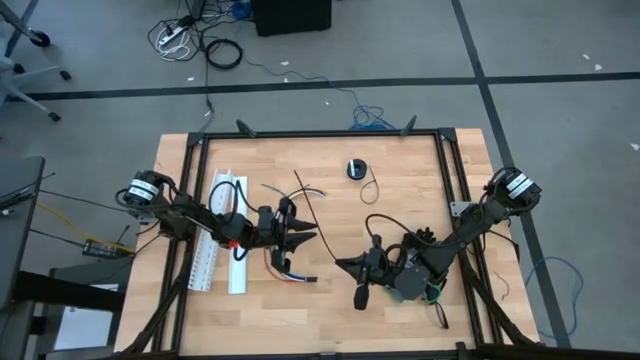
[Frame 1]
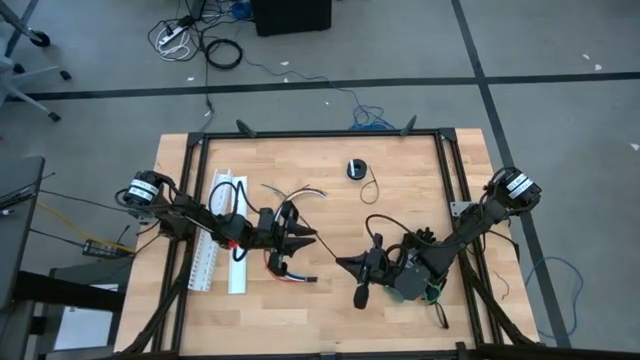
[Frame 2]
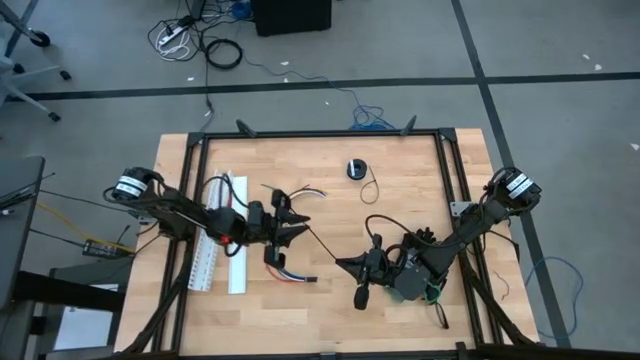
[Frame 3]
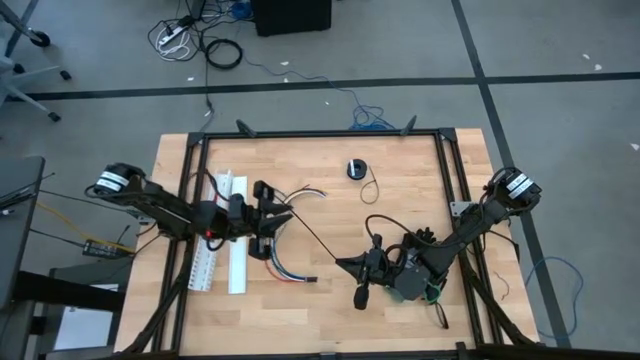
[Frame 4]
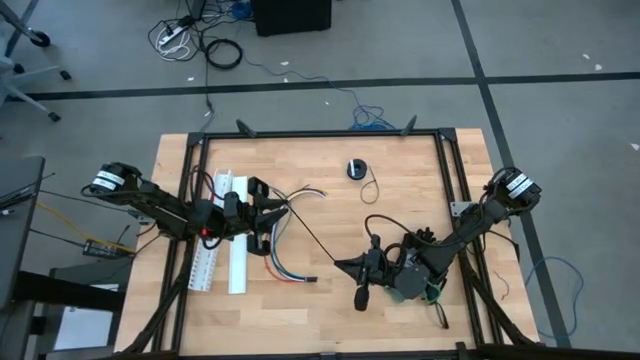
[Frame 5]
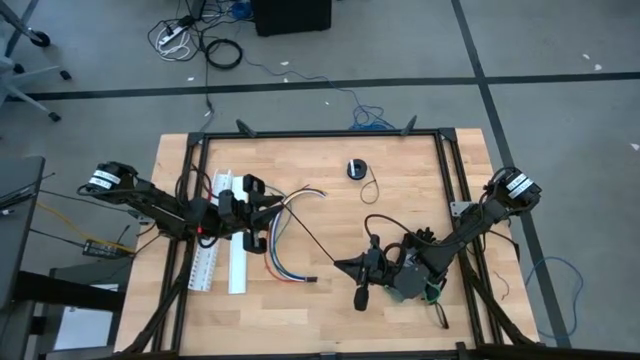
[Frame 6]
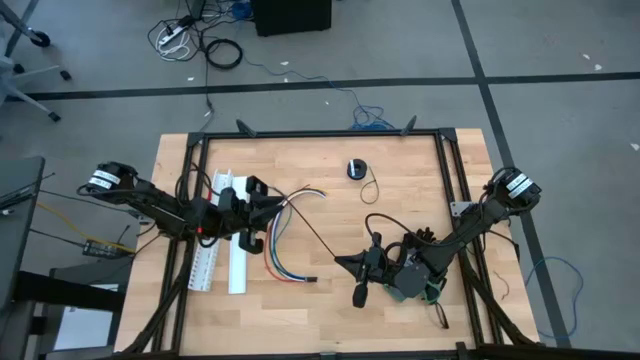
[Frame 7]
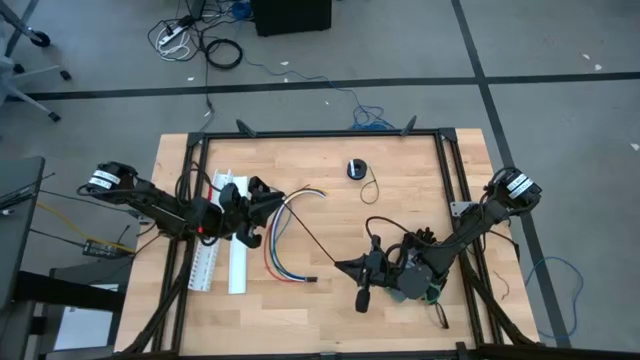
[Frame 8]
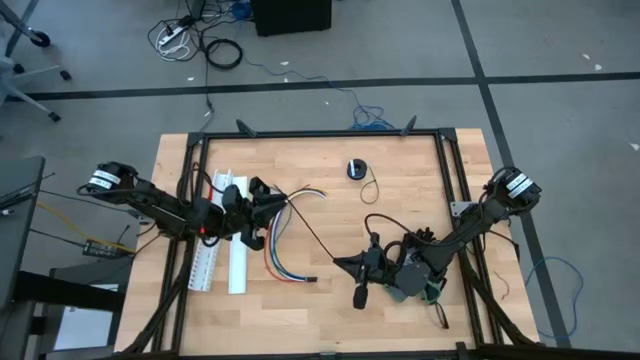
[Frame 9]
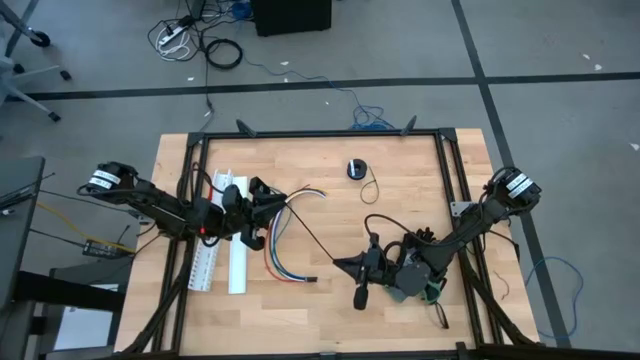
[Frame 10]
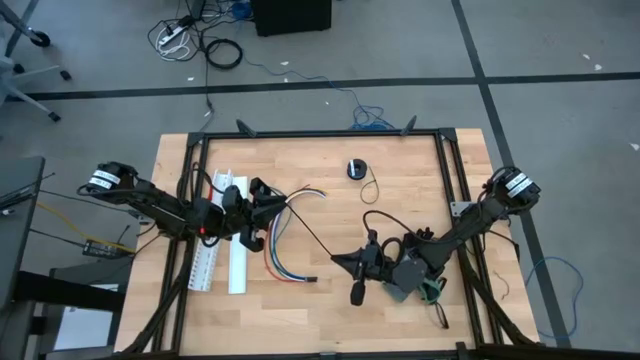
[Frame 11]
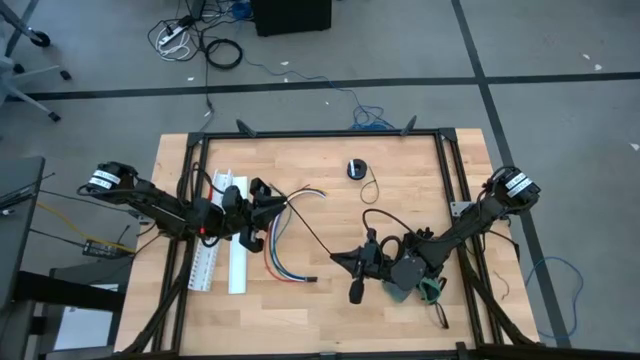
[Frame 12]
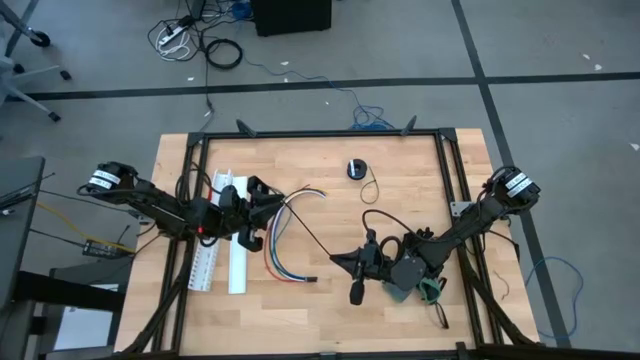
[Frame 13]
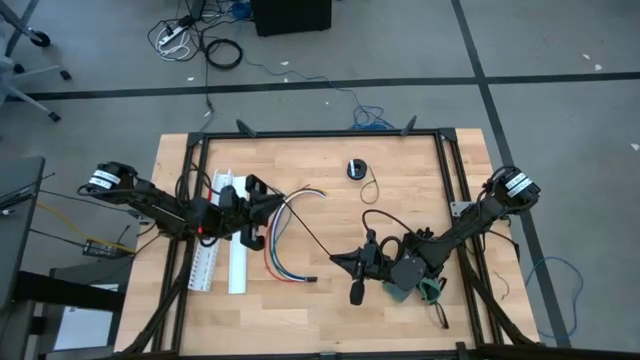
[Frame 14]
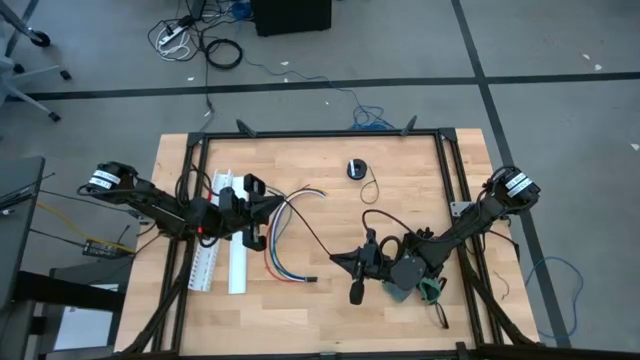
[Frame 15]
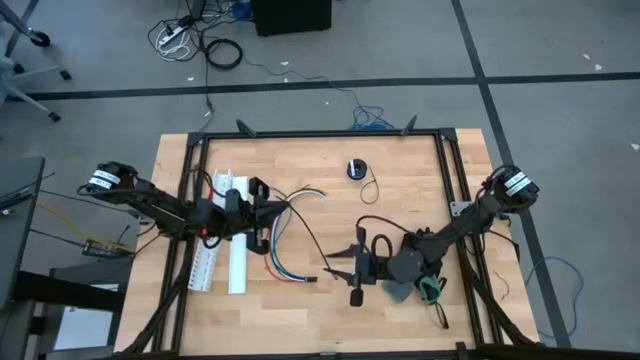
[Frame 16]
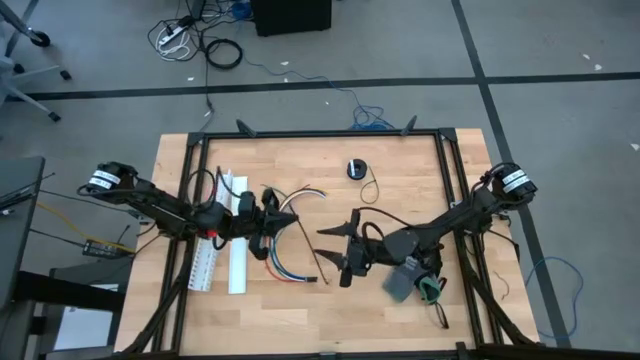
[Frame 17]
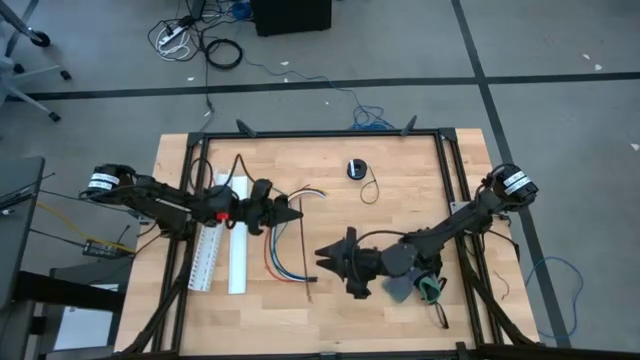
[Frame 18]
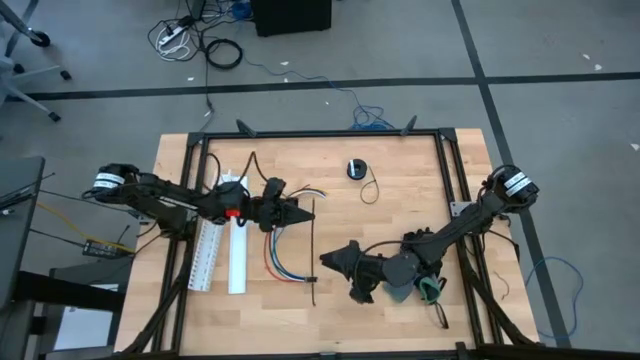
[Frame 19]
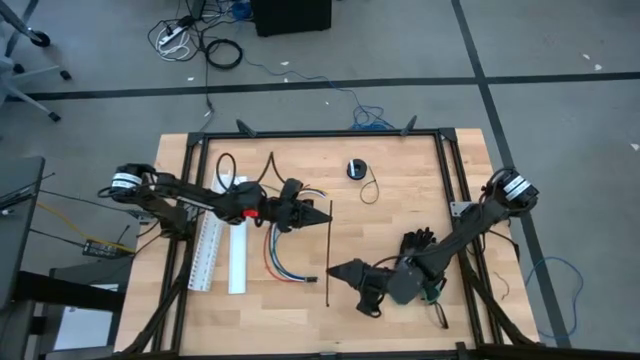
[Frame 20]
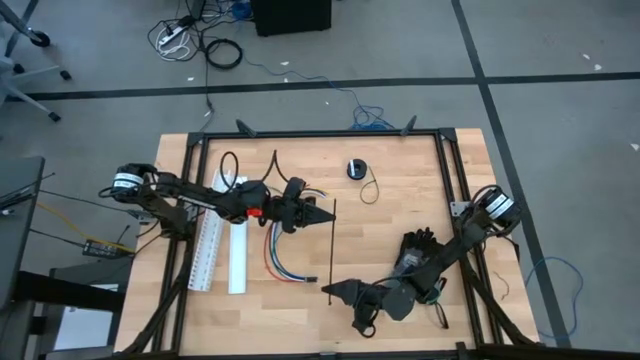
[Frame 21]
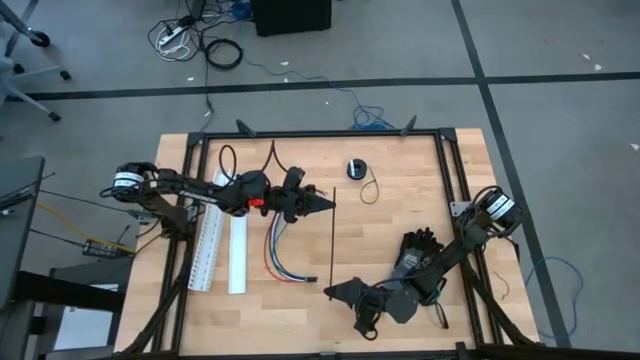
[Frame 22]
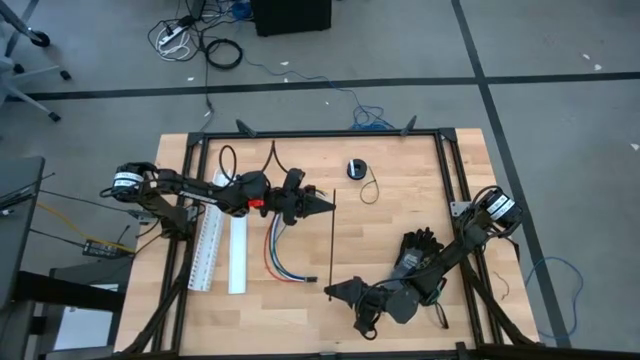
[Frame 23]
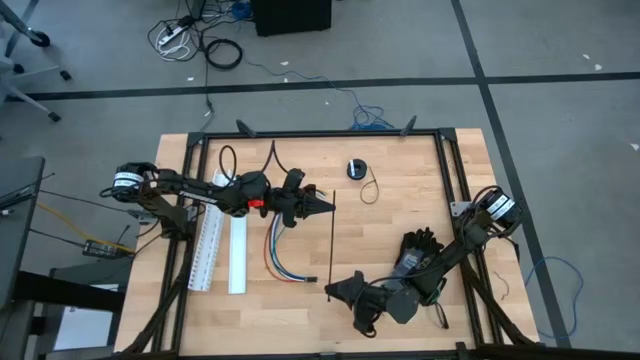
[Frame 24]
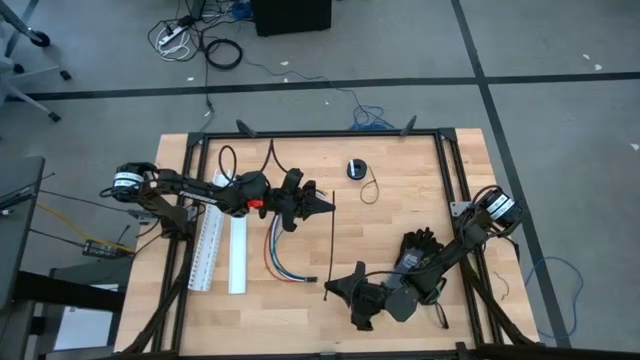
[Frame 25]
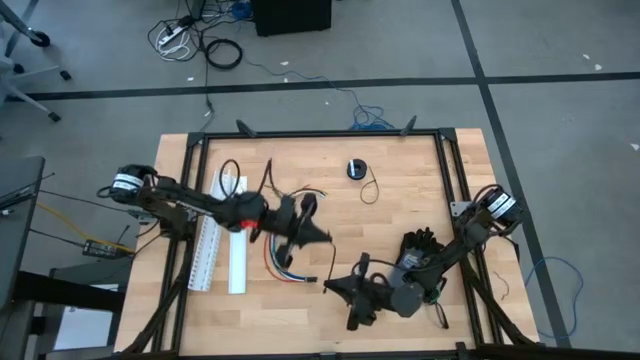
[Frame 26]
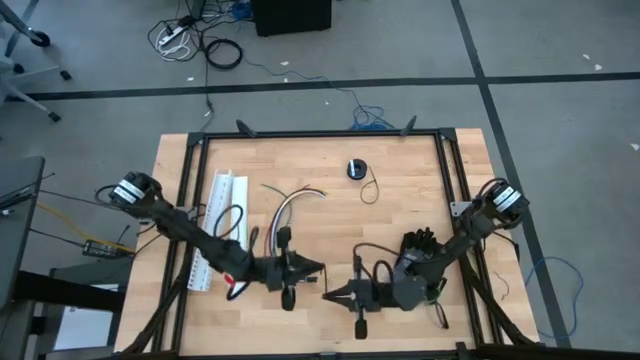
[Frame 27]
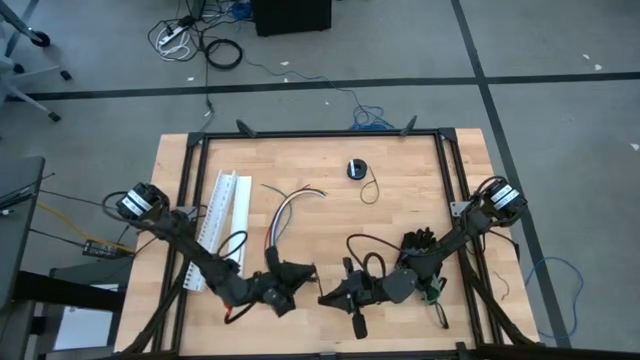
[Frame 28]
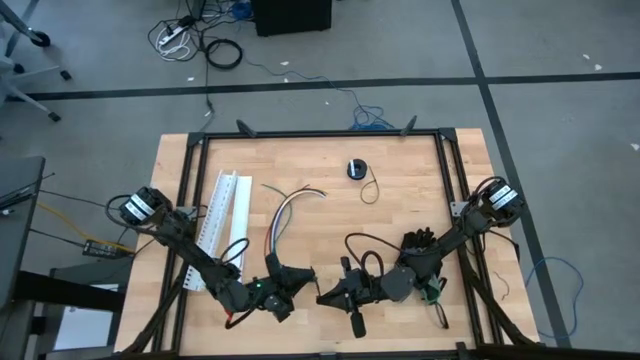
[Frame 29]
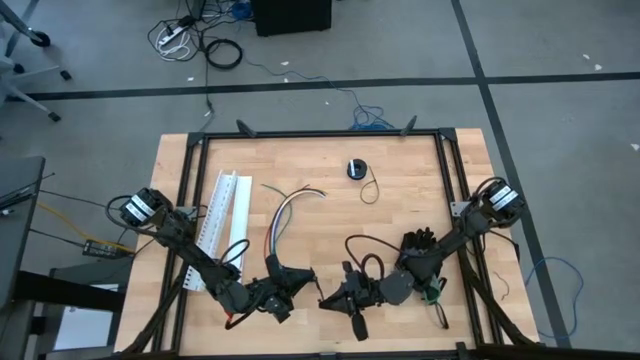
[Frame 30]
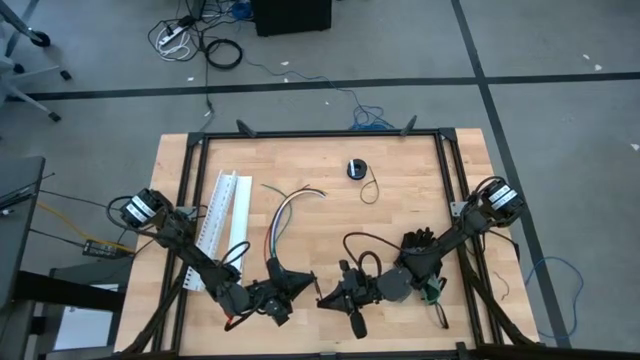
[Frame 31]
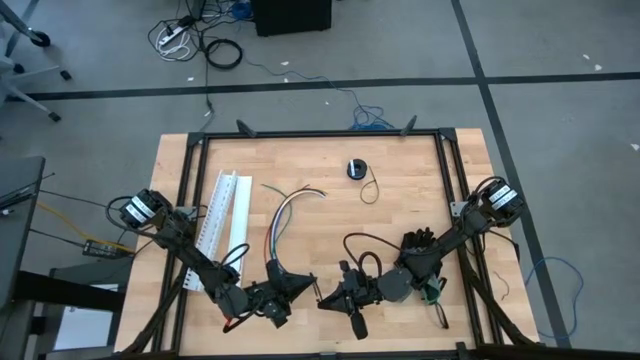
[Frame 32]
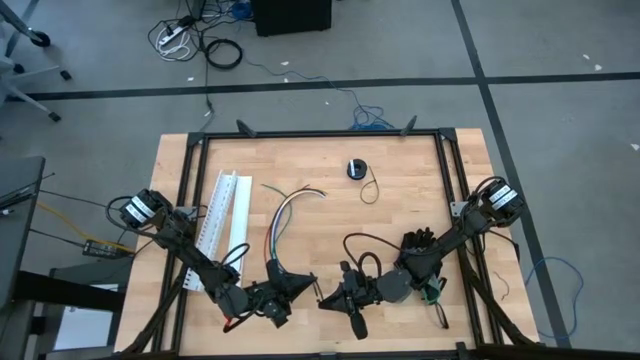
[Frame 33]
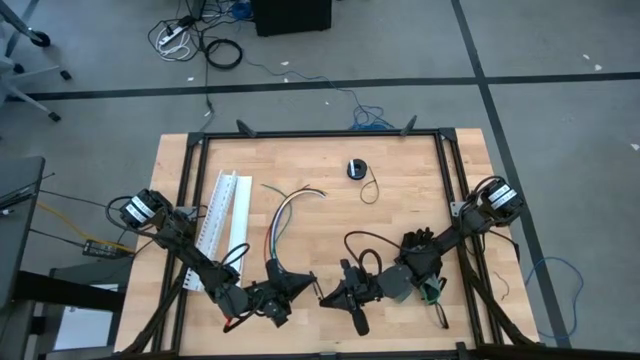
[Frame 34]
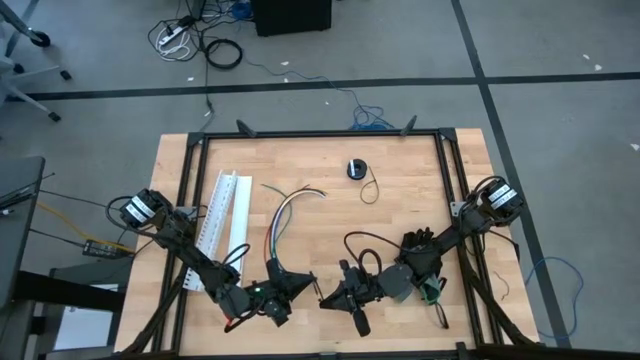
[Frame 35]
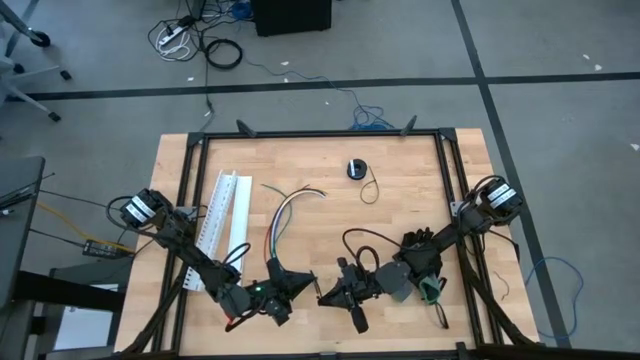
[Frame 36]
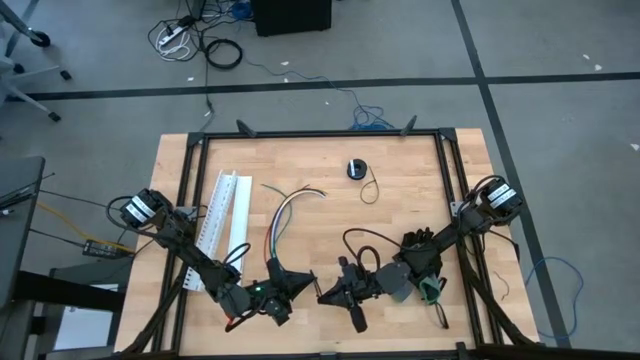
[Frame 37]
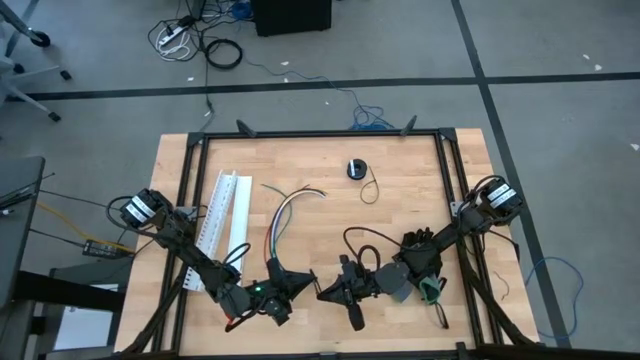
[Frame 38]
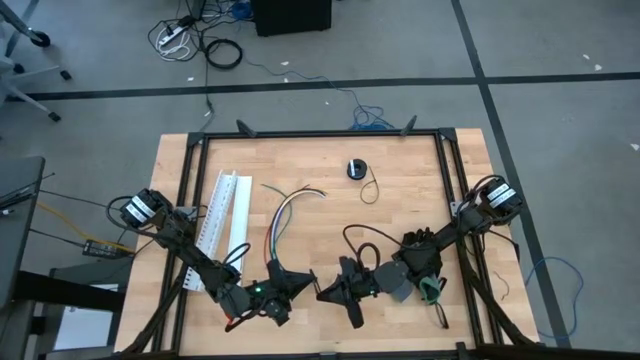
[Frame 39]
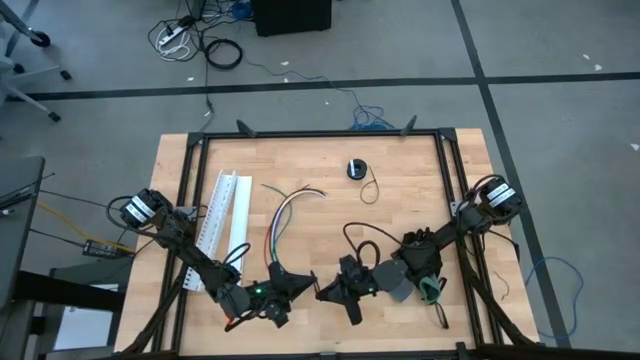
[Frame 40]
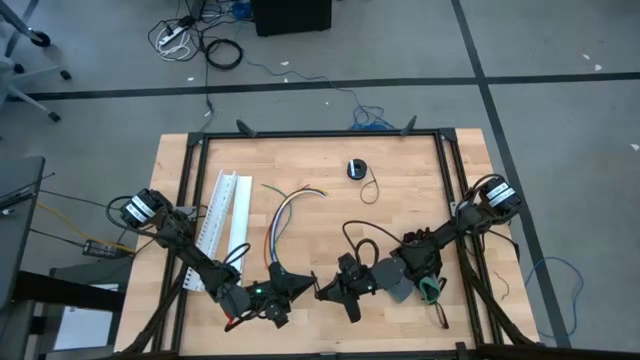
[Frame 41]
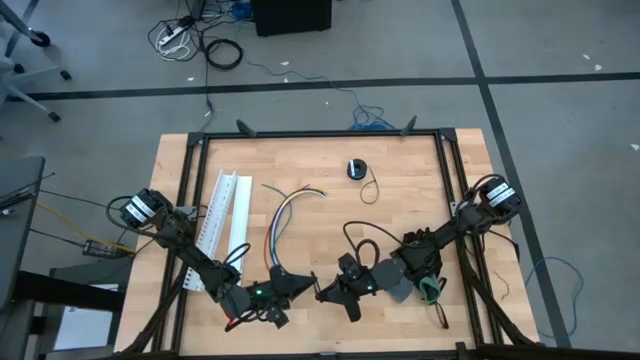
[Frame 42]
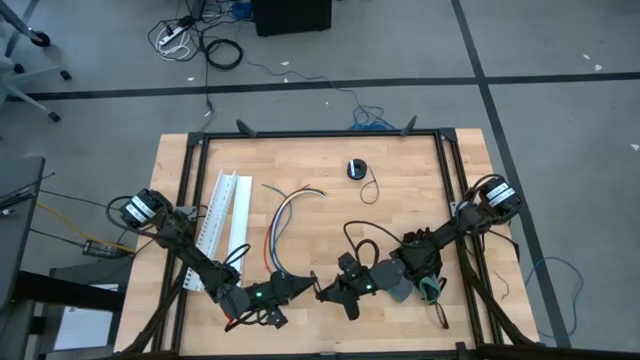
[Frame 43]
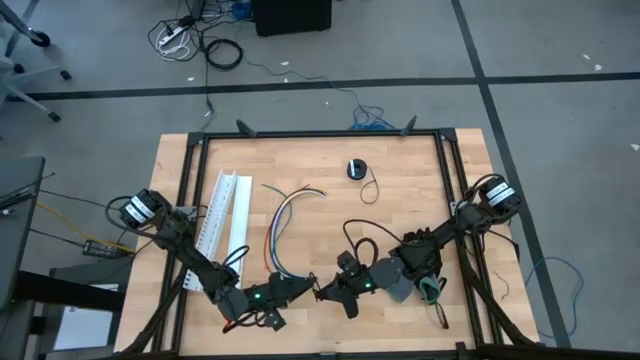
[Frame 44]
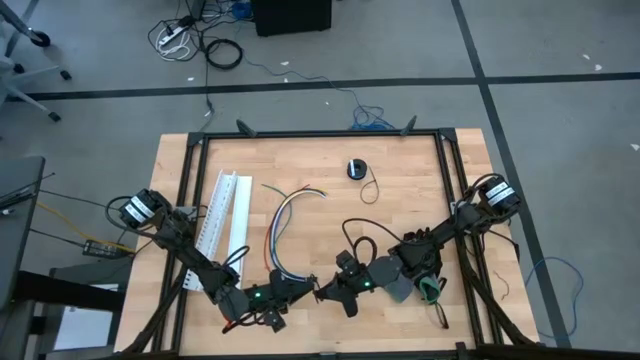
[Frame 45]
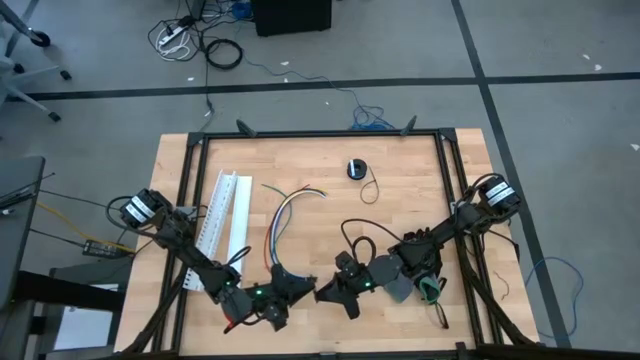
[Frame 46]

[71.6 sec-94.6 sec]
Task: Ziptie cables
Wrap the cables together using a ziptie
